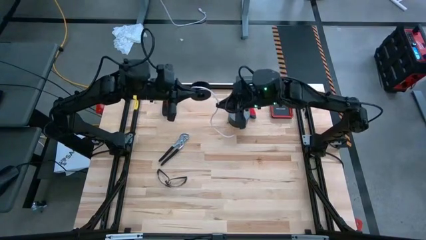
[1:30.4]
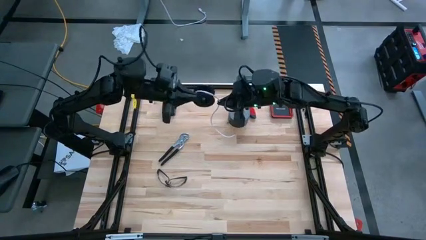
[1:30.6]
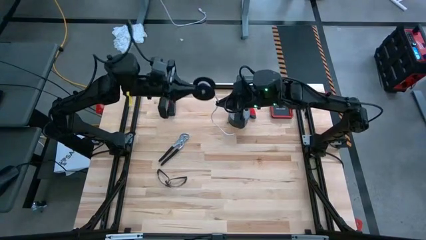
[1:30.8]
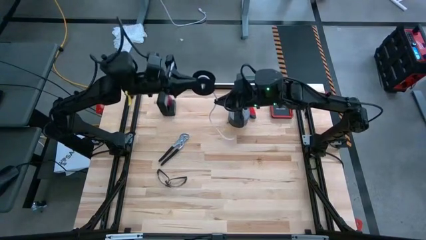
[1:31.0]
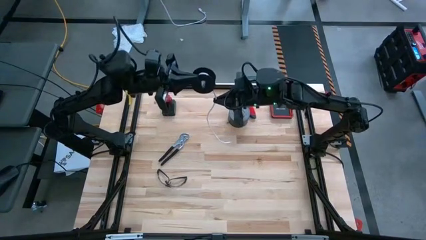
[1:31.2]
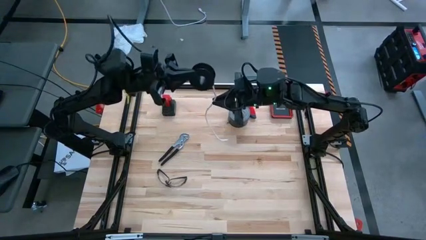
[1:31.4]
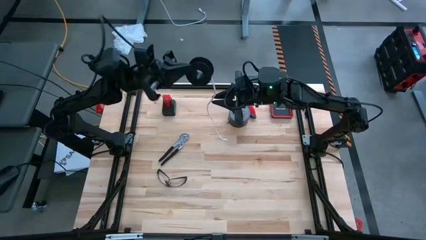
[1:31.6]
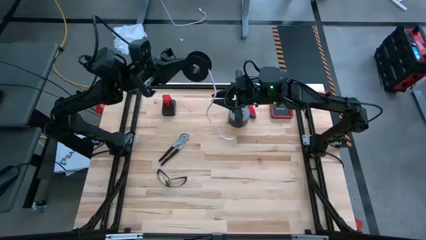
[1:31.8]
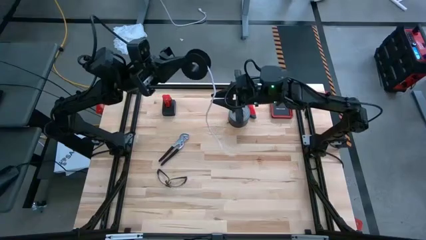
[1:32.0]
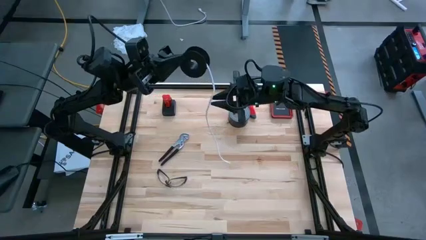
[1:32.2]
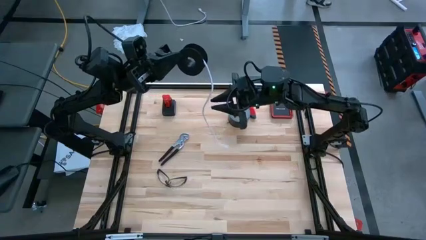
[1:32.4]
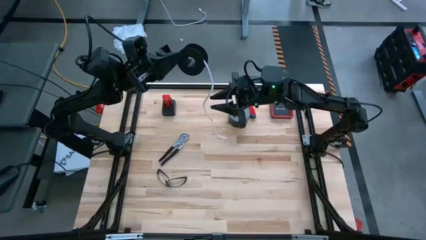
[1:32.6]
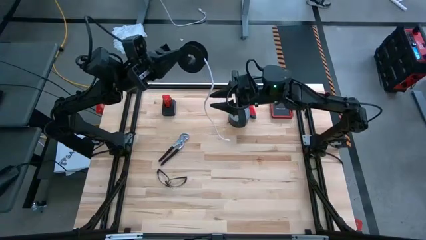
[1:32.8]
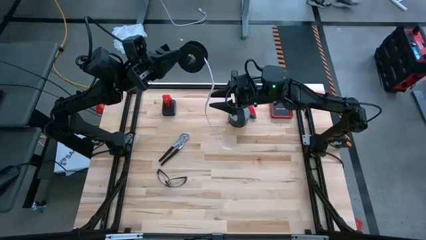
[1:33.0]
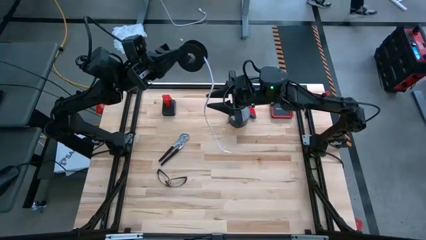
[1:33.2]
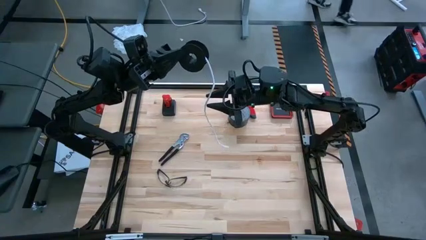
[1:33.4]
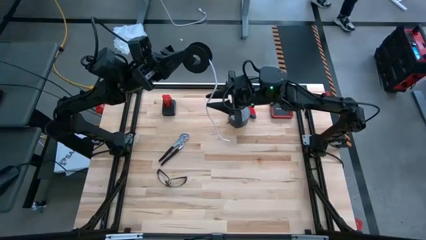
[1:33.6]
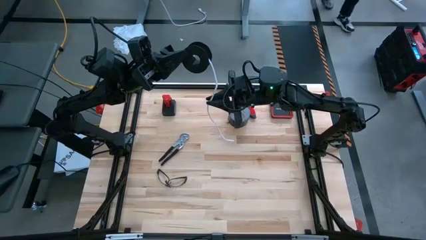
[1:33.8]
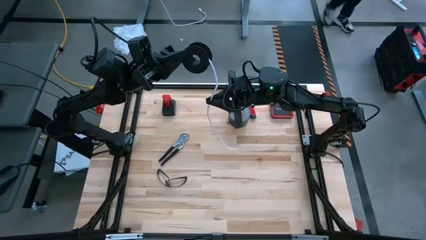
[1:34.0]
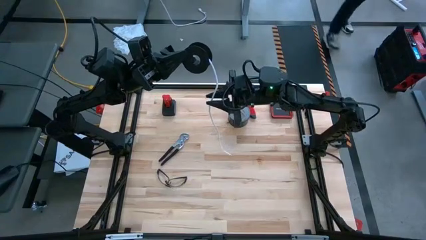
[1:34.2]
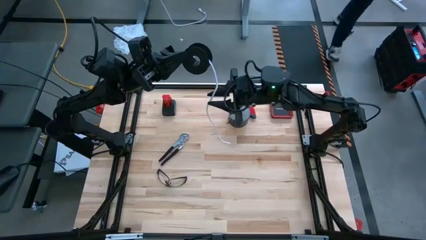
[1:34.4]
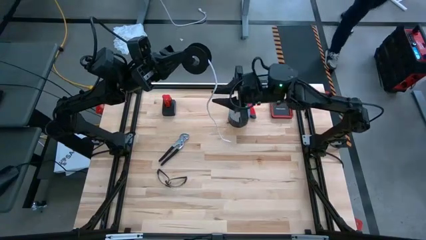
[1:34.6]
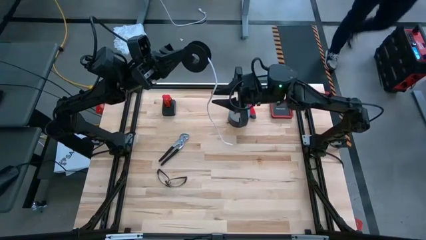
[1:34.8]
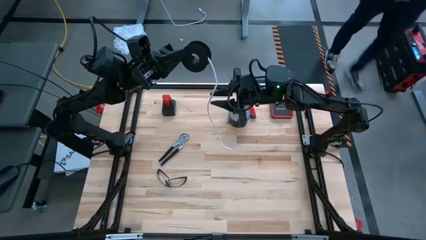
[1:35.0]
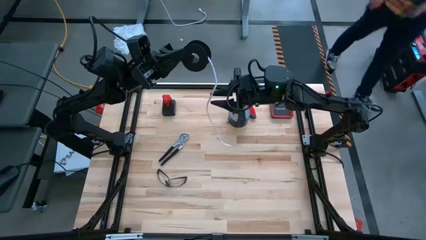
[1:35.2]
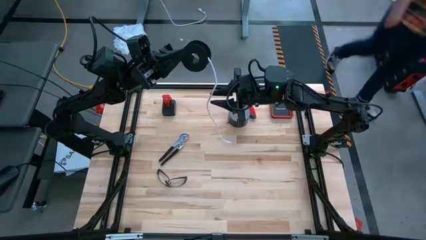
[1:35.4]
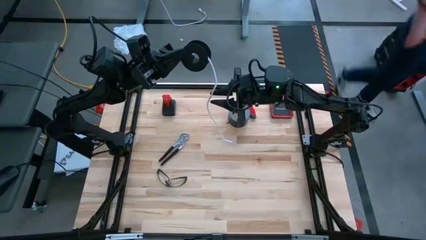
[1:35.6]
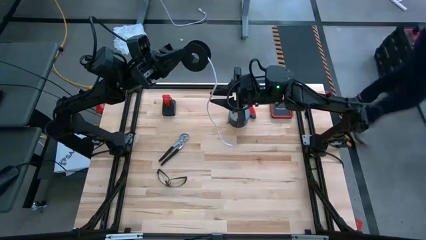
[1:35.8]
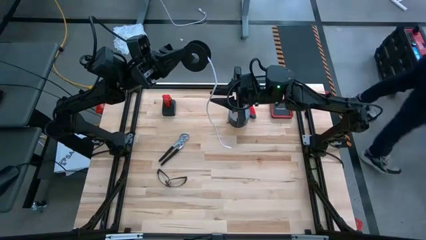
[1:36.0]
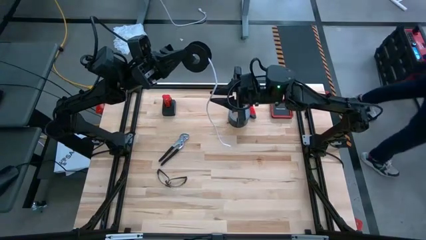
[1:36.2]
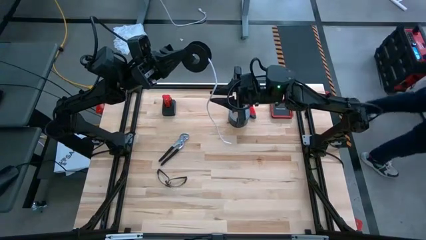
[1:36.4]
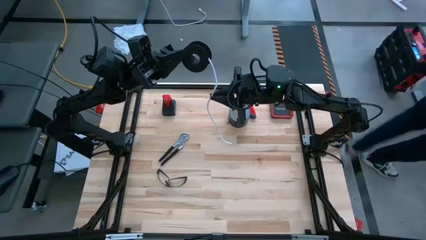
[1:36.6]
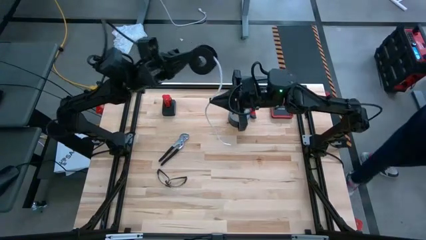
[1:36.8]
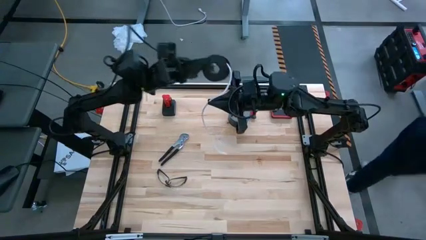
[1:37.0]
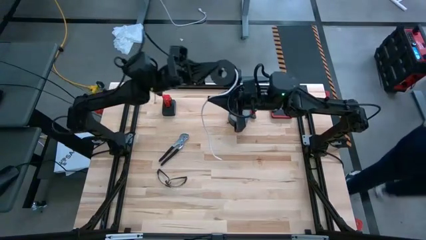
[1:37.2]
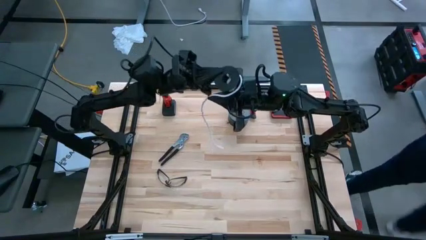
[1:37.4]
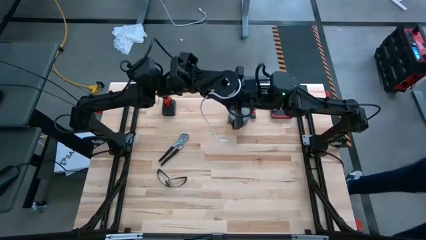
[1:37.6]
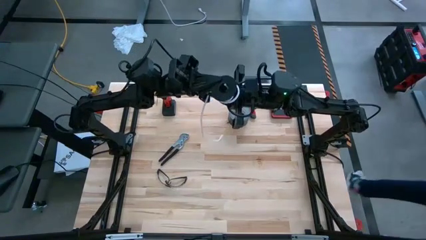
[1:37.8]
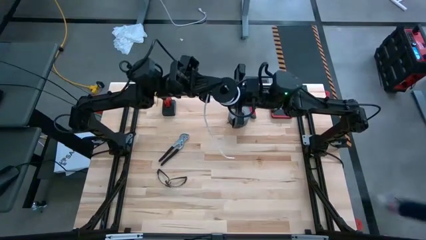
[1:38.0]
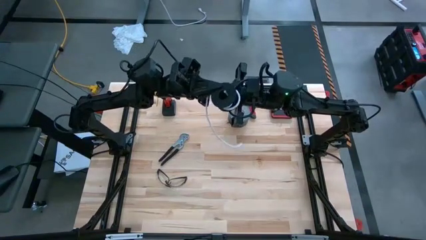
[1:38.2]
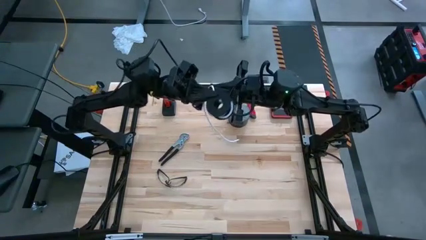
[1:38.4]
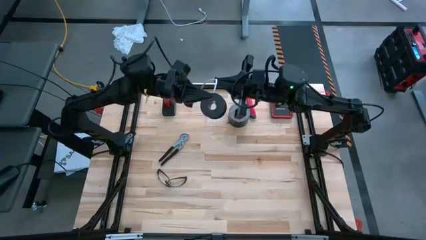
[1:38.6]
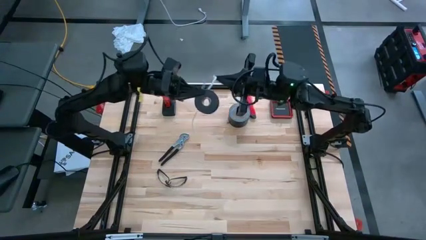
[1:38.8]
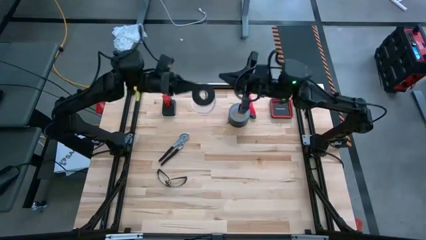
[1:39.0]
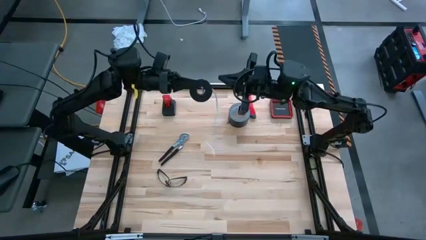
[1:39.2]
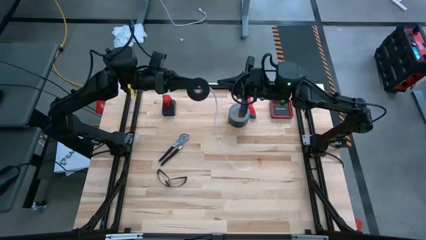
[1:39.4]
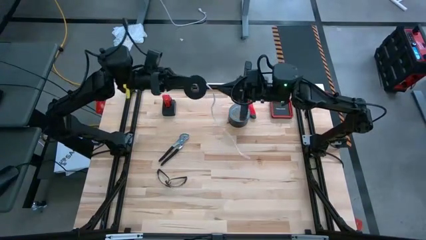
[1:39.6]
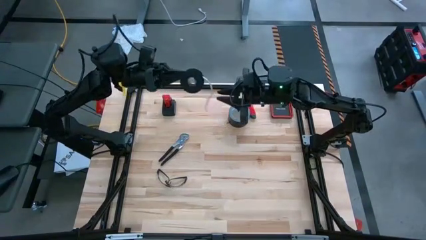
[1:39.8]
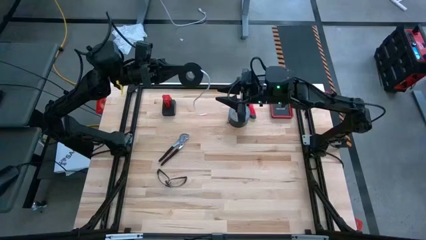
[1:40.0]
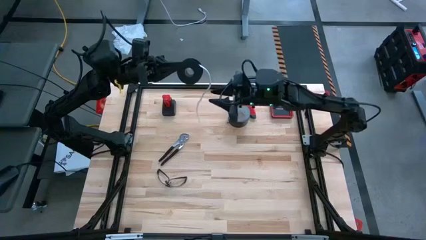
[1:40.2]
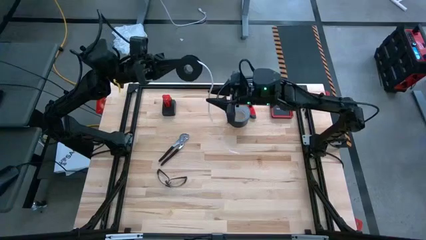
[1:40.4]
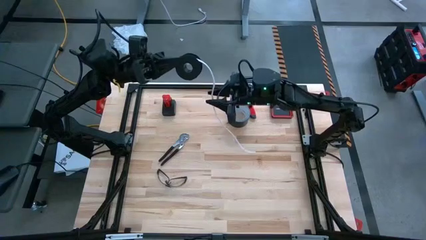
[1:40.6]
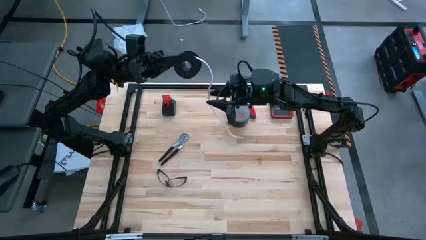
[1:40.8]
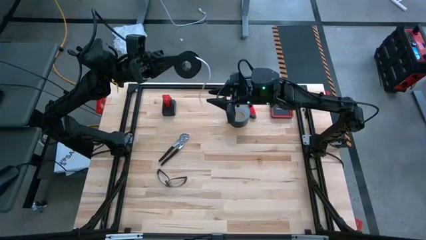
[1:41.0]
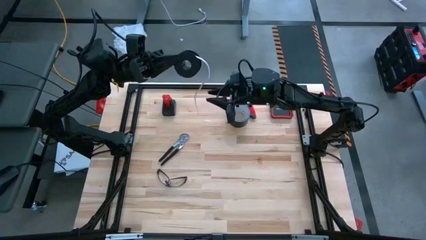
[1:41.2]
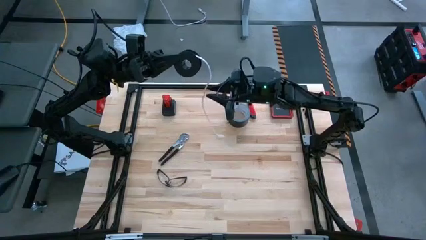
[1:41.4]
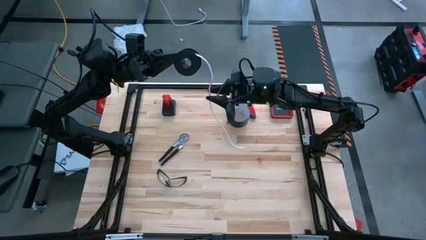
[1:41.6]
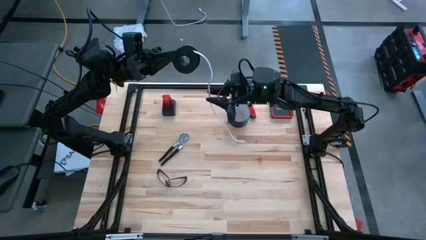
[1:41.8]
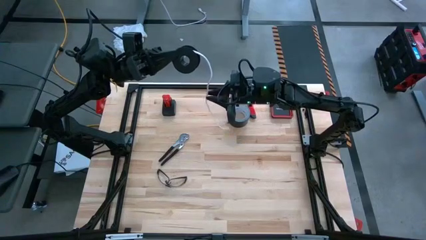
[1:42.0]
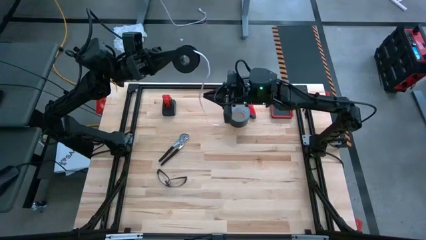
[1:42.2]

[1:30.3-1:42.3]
Task: Coil cords
Coil the white wire onto the black spool

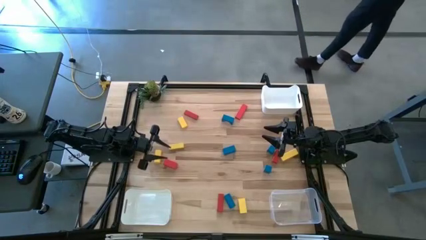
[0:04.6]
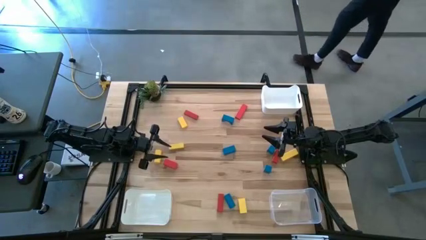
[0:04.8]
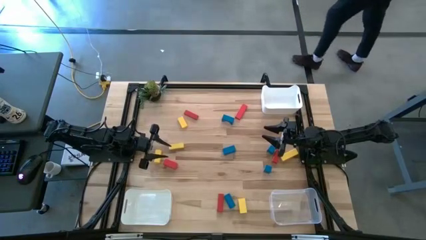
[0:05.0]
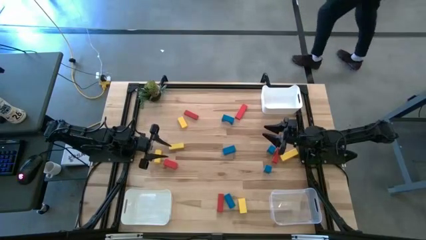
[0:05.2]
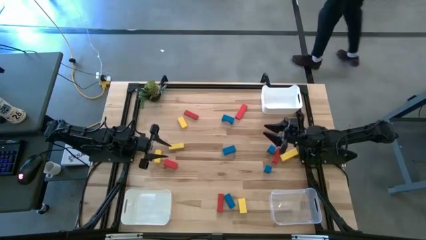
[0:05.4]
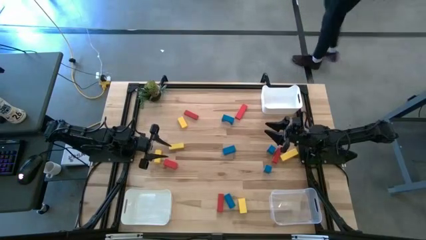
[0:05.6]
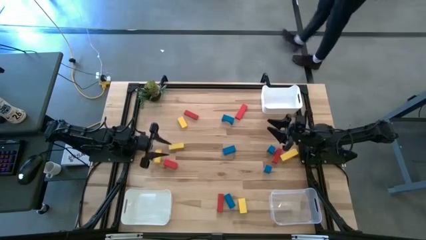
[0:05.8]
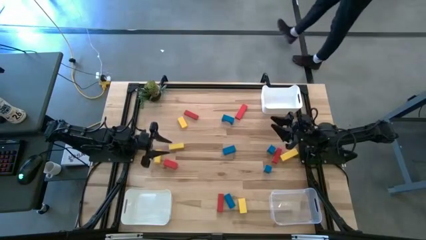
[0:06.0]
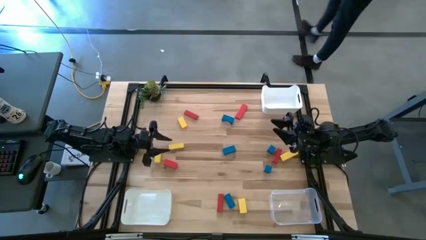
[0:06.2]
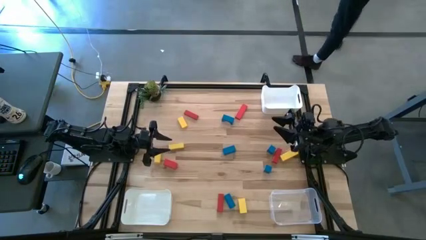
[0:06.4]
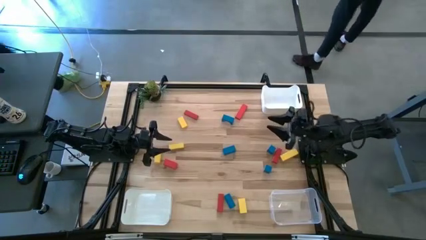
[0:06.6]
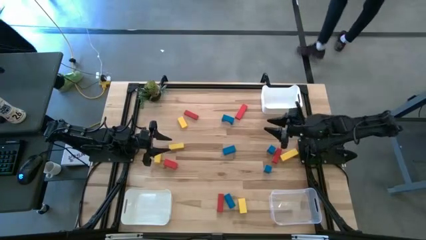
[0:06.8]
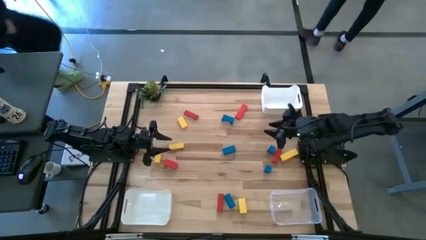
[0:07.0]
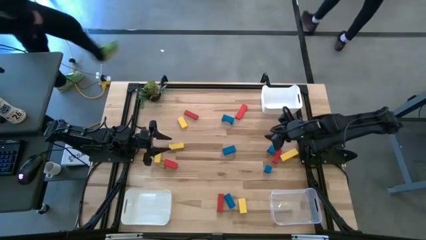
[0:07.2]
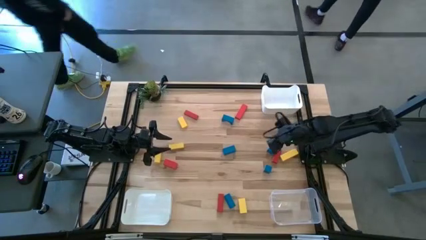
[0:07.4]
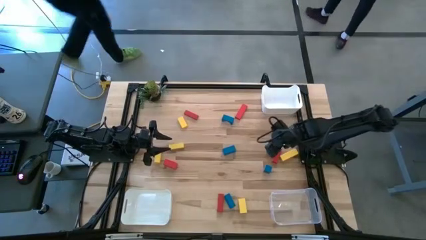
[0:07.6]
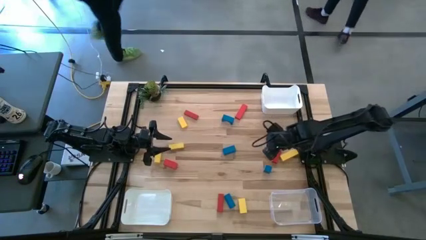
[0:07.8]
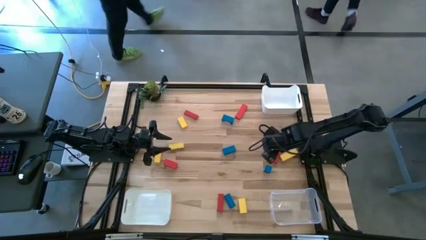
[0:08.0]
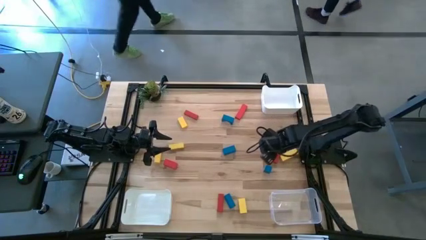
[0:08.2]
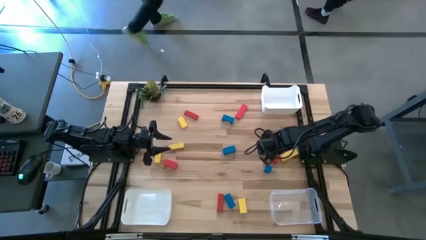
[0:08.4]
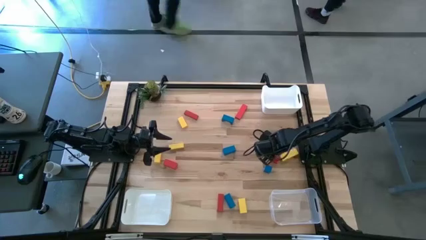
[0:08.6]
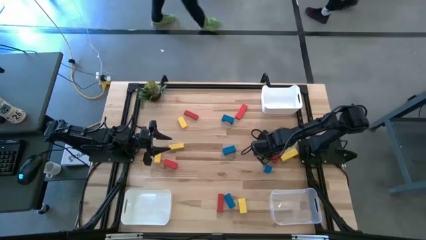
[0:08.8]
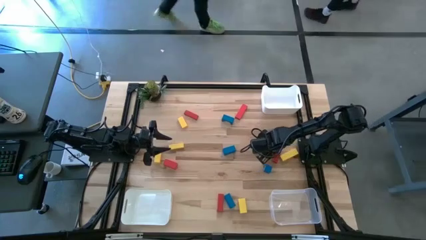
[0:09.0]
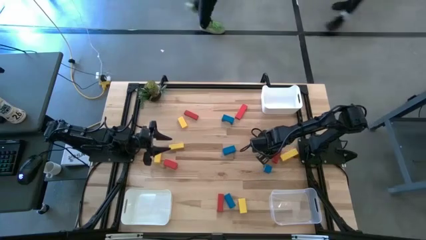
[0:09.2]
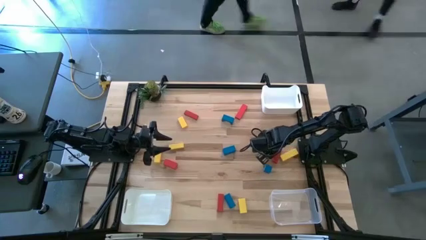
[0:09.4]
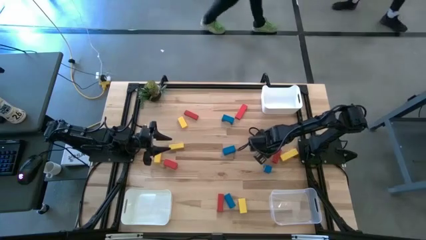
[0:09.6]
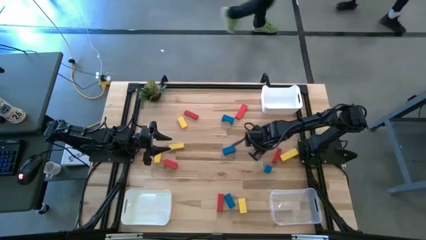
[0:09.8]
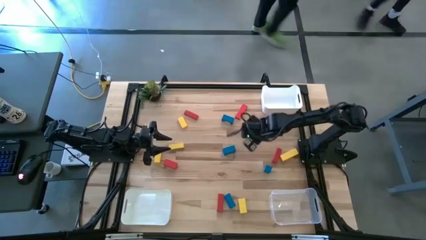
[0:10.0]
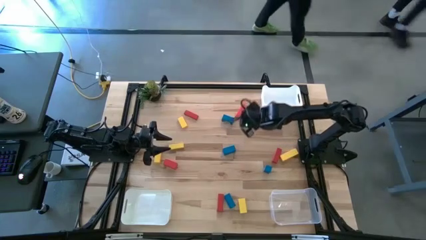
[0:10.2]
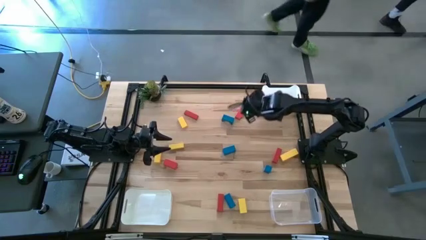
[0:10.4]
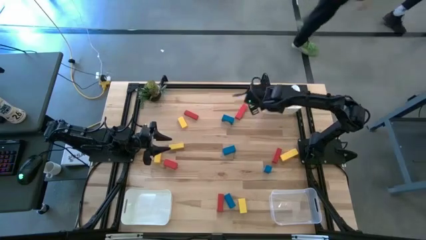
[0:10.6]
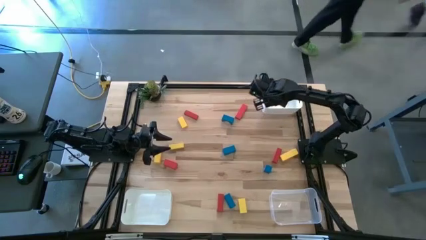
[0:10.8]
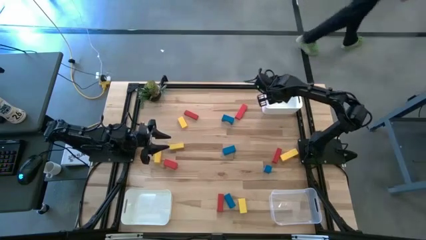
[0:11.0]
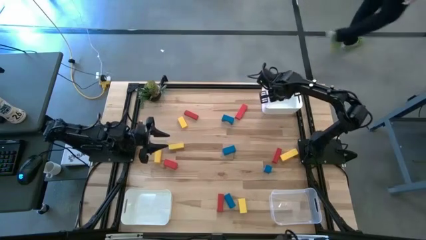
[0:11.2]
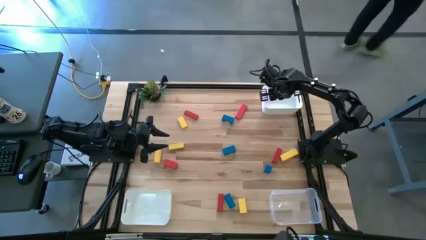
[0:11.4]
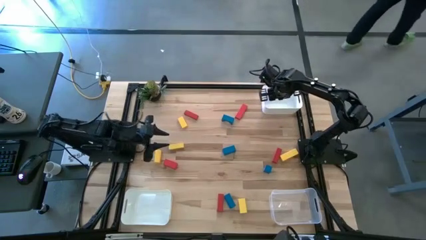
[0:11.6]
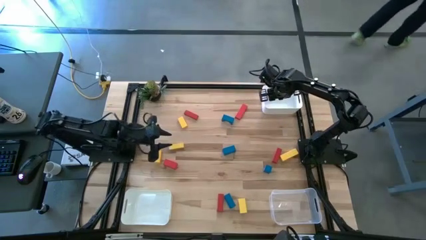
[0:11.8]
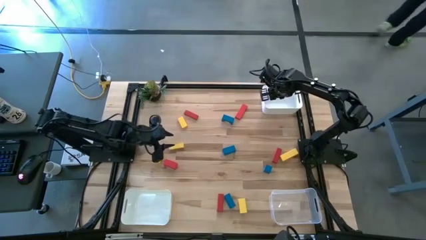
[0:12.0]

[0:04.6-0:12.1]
Task: Sort & place blocks by color
Put the blue block into the top white bin
